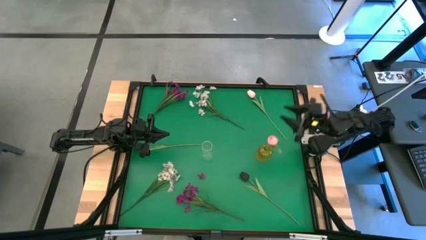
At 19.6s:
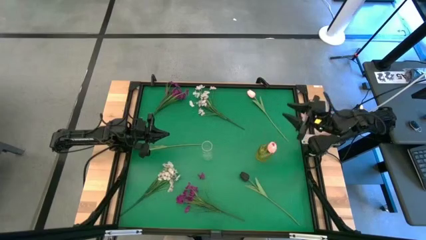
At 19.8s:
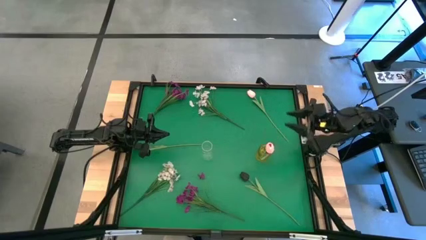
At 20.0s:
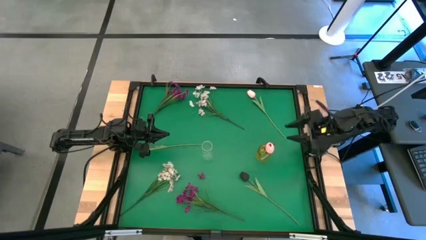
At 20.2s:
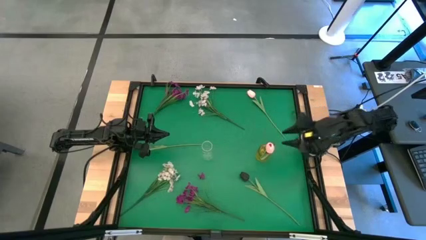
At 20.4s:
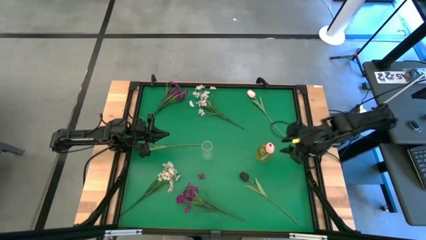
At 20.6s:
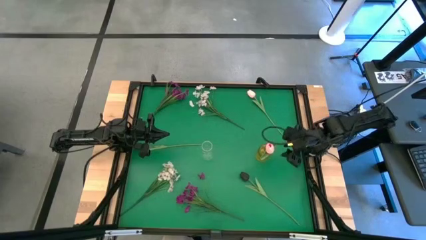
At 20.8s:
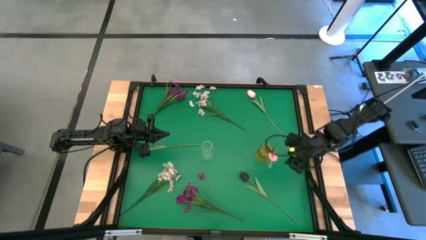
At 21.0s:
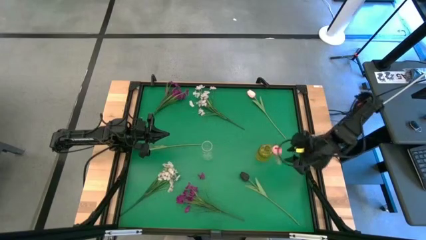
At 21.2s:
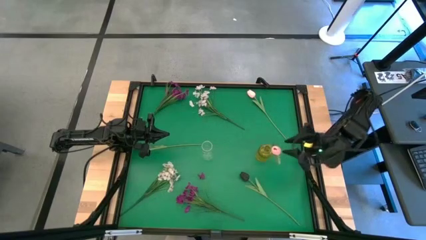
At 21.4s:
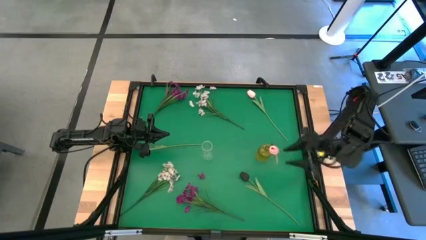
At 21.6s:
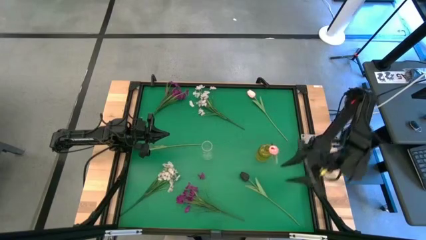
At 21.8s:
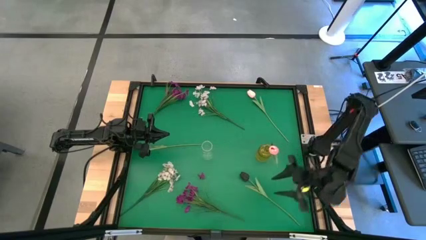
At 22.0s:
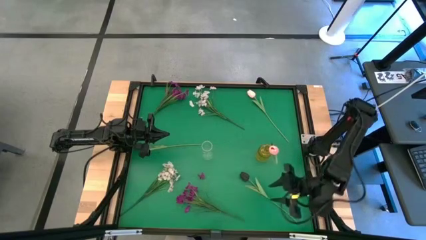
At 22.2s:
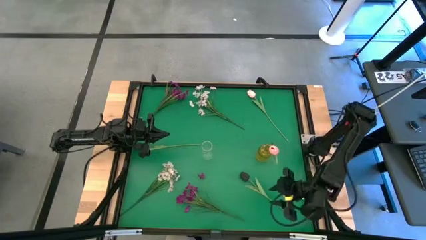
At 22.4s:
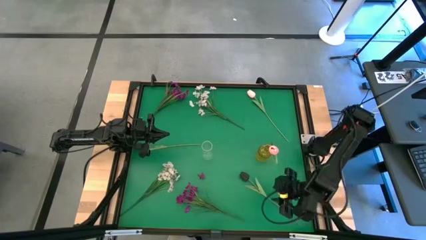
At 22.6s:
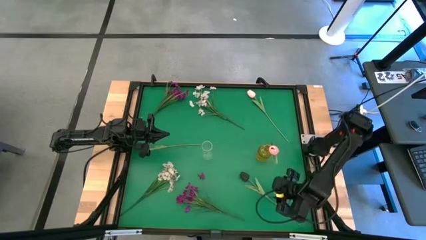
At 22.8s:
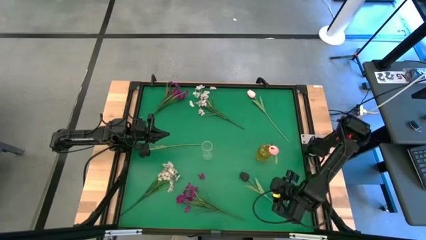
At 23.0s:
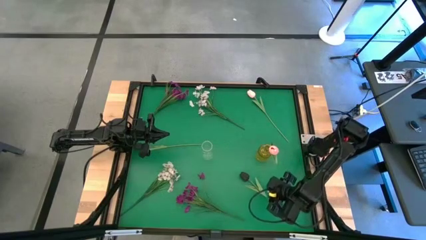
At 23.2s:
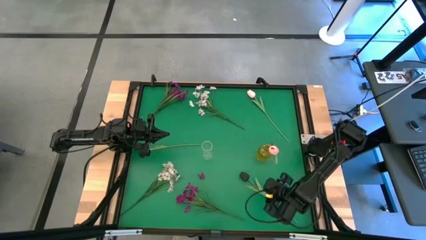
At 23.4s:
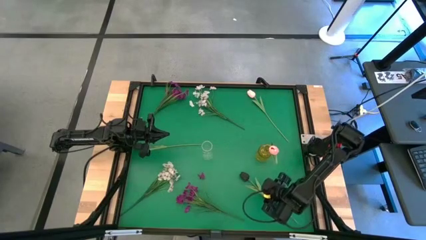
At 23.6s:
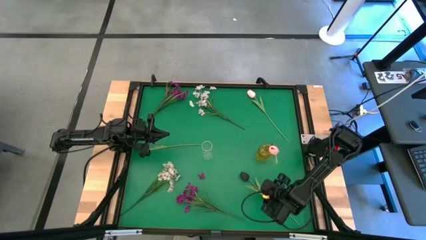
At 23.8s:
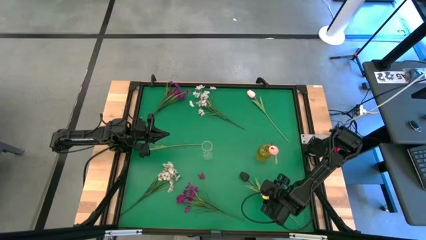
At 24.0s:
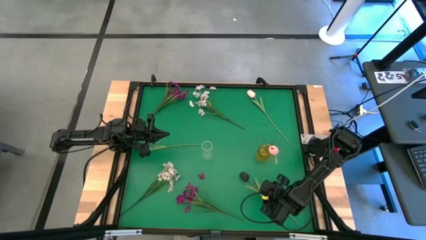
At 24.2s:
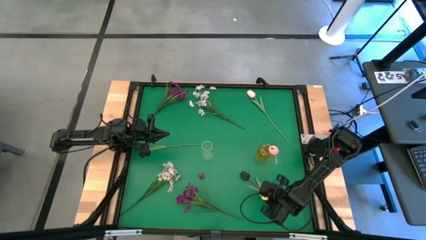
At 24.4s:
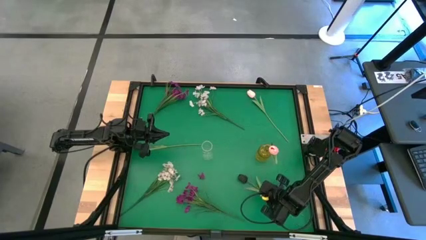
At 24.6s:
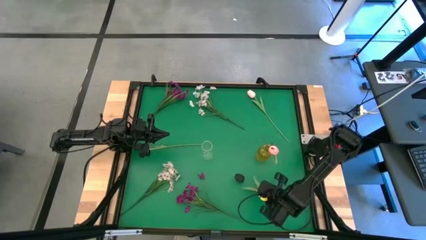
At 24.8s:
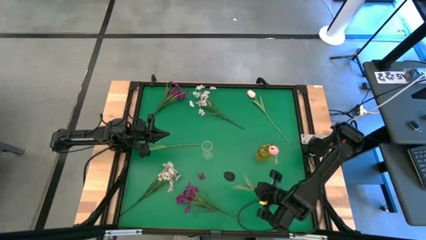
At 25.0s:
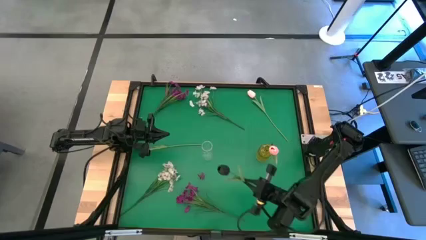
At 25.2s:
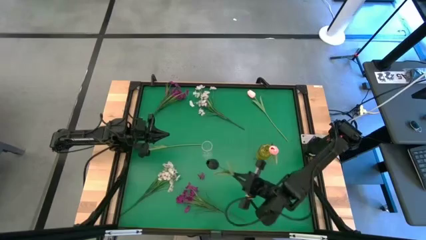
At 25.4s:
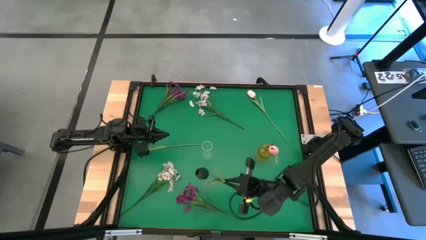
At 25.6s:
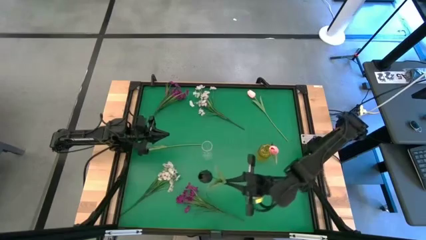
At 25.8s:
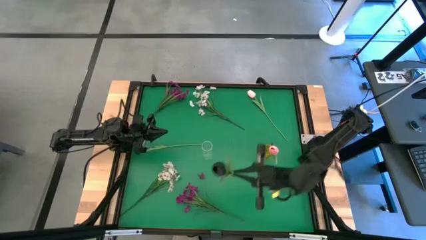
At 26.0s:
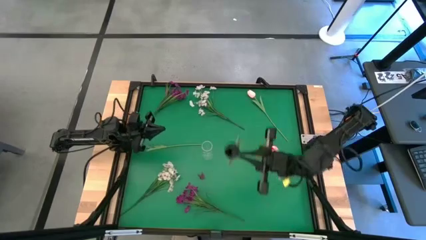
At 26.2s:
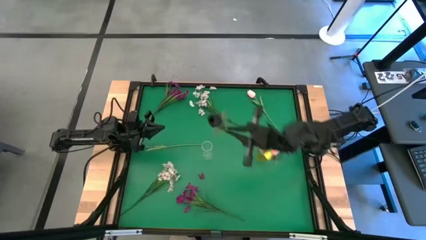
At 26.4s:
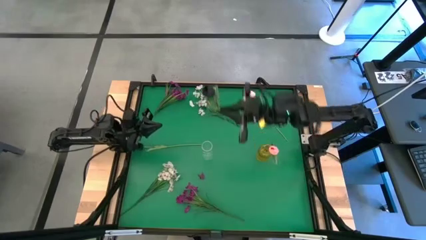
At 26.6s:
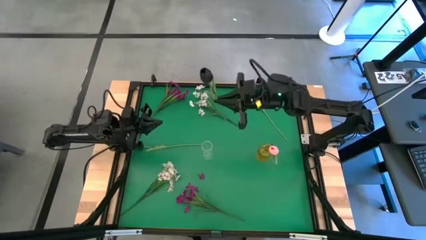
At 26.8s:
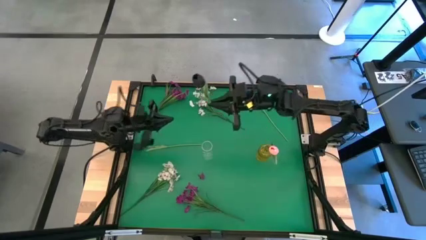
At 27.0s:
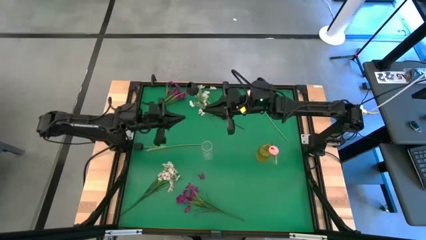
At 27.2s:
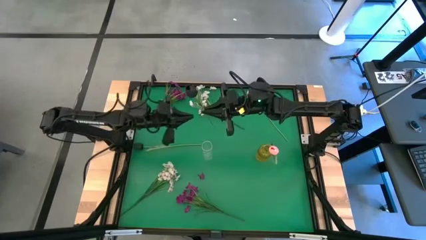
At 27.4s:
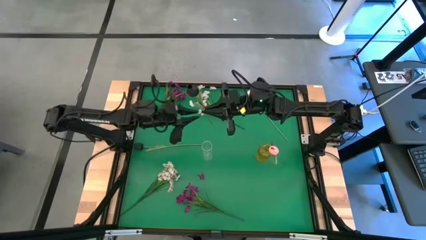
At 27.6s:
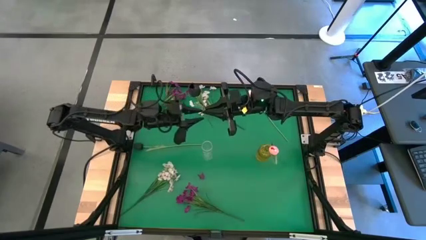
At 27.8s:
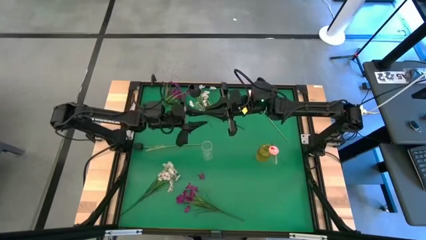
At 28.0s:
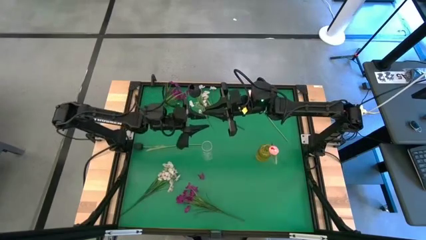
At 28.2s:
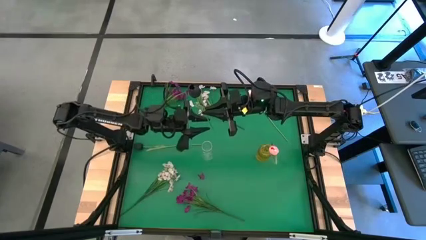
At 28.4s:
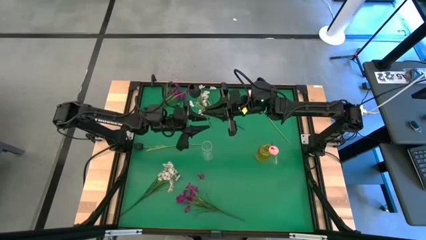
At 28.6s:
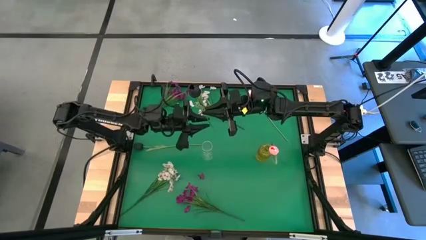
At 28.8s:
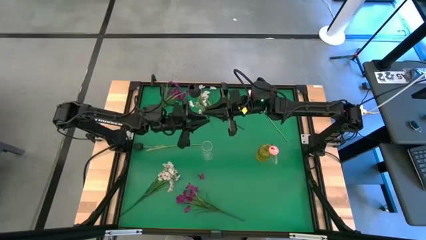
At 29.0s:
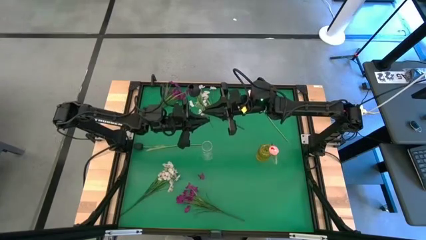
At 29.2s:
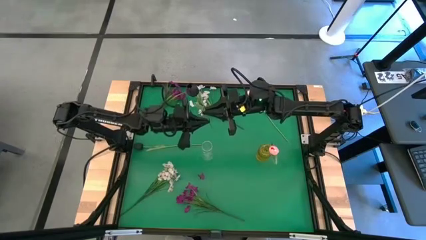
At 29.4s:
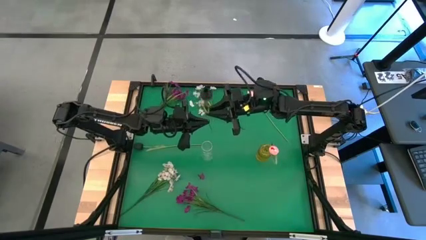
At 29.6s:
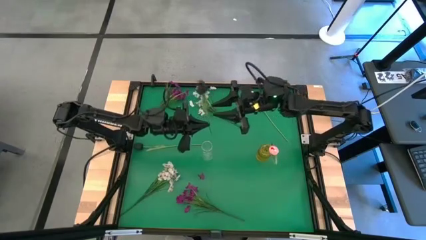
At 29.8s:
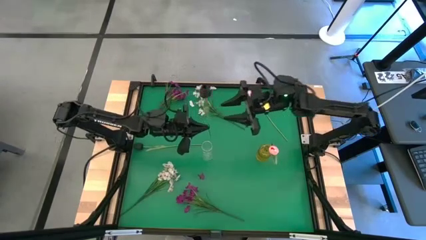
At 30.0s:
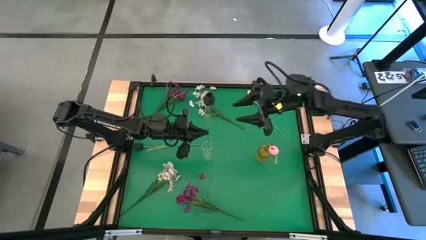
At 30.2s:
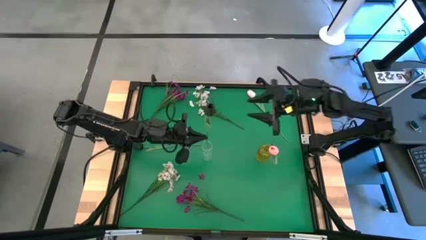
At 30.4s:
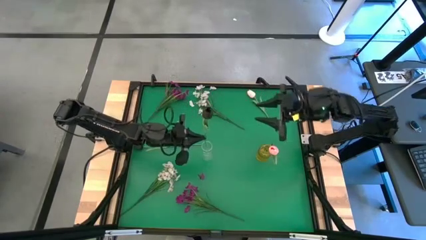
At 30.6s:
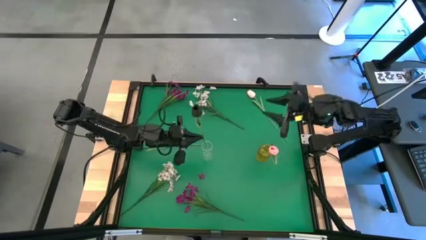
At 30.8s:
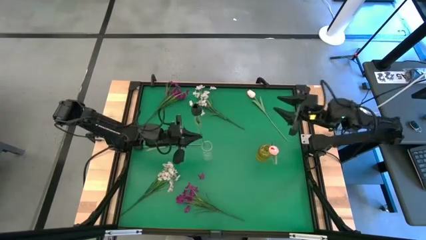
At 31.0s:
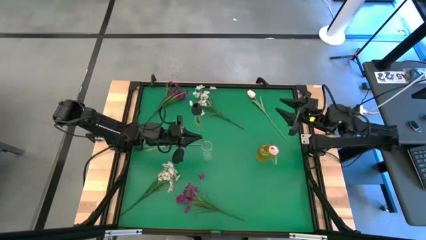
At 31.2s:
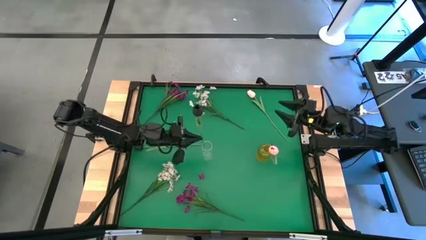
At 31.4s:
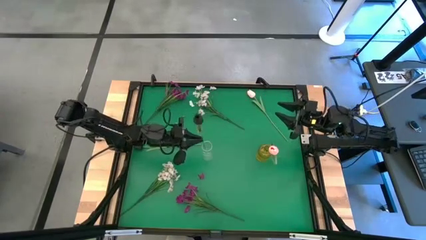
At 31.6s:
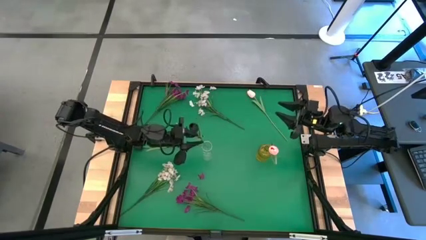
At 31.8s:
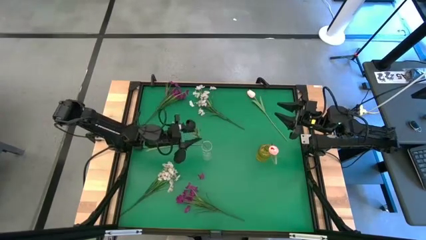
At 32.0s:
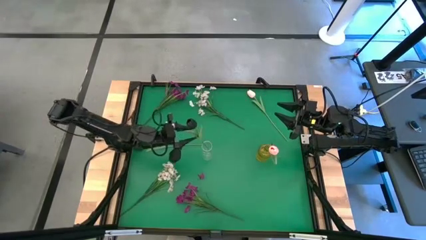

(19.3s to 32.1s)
Task: Sort flowers into vase by color
Put the bottom black tulip into the transparent vase
